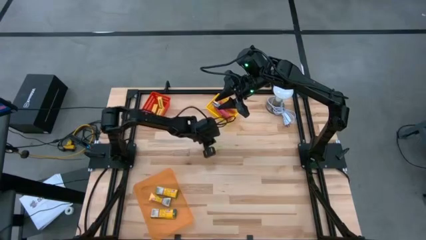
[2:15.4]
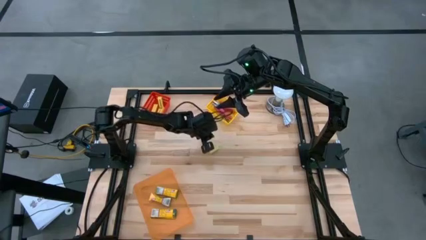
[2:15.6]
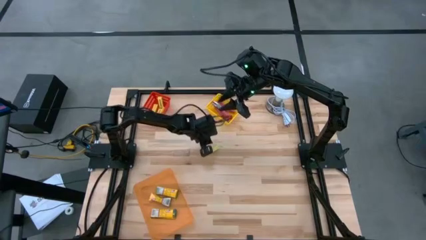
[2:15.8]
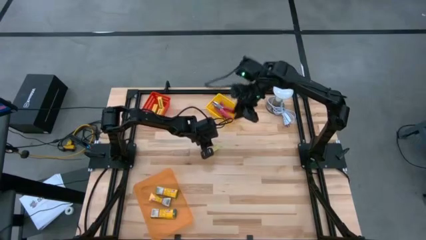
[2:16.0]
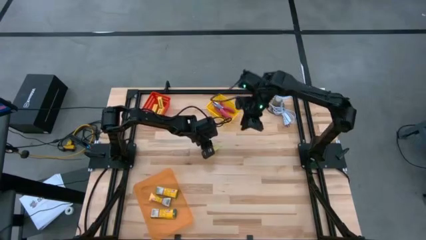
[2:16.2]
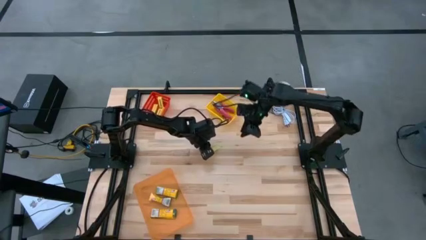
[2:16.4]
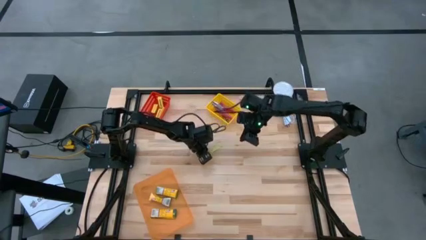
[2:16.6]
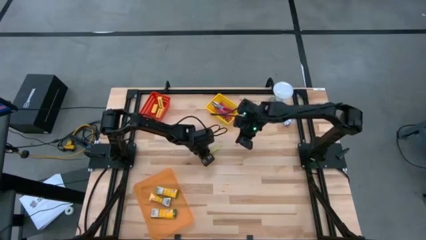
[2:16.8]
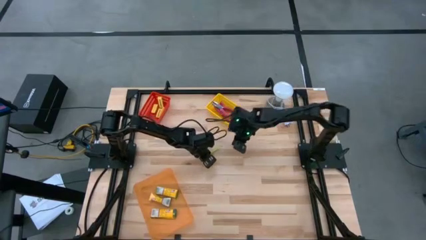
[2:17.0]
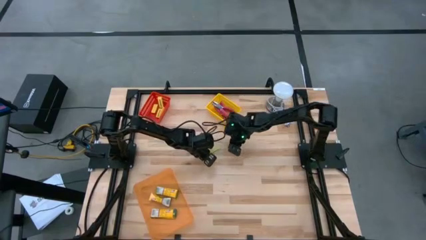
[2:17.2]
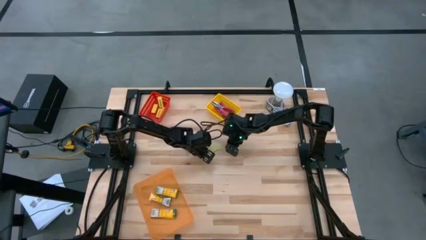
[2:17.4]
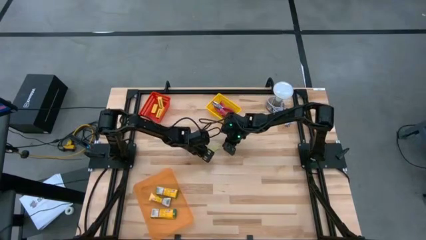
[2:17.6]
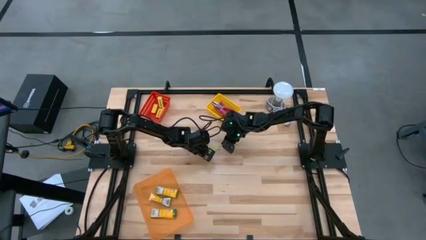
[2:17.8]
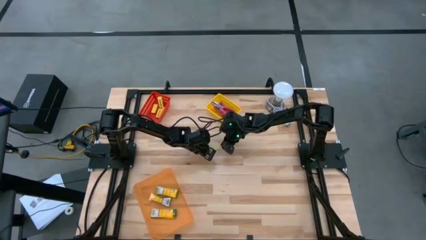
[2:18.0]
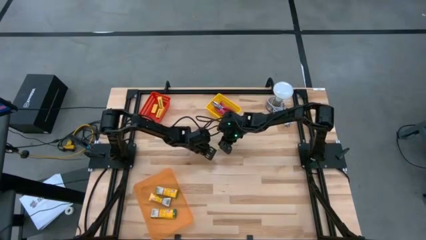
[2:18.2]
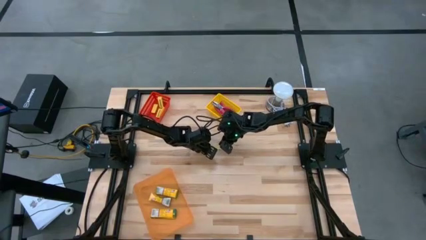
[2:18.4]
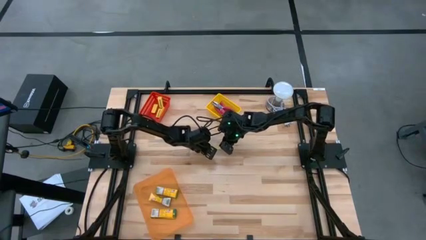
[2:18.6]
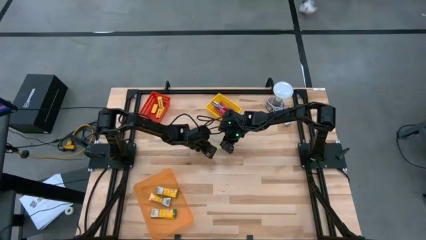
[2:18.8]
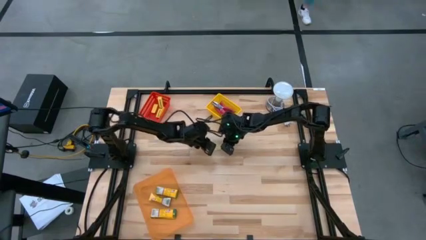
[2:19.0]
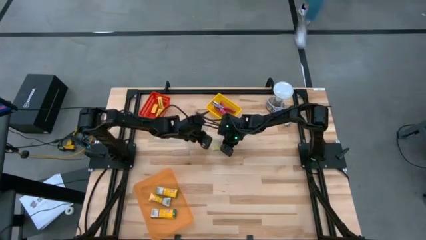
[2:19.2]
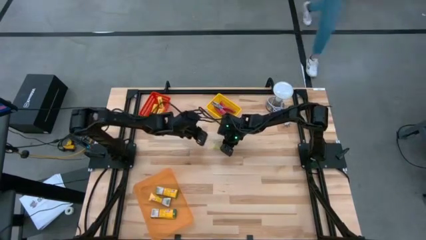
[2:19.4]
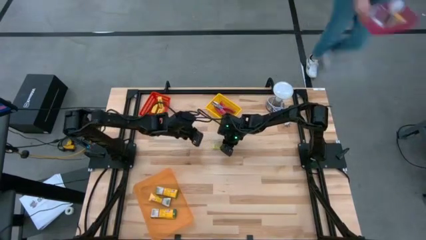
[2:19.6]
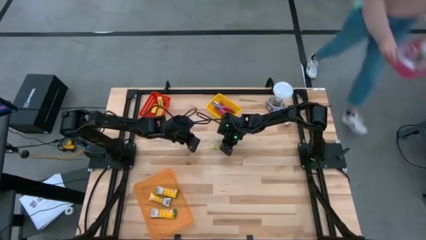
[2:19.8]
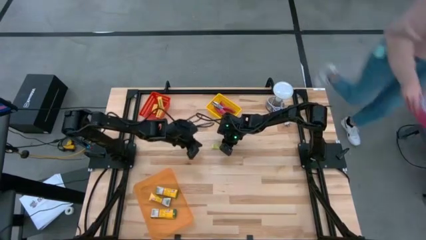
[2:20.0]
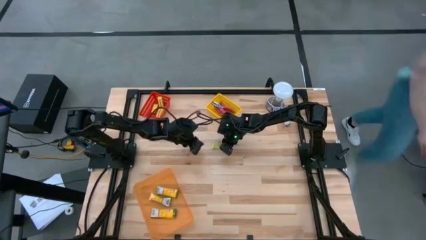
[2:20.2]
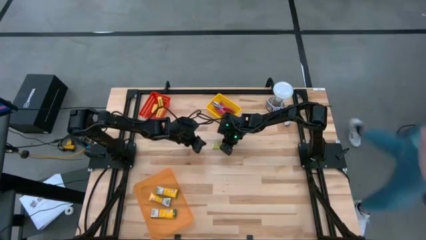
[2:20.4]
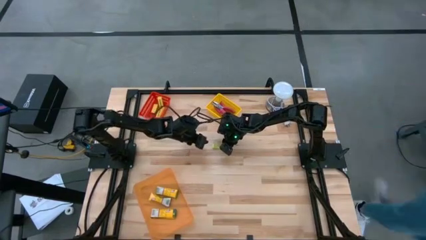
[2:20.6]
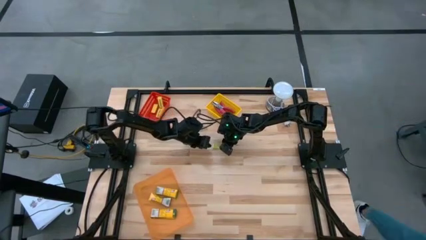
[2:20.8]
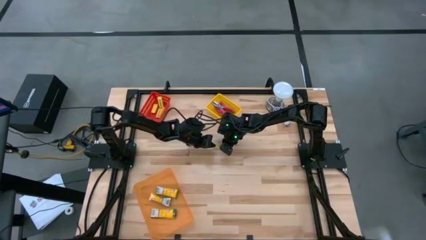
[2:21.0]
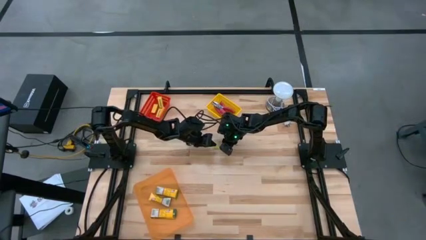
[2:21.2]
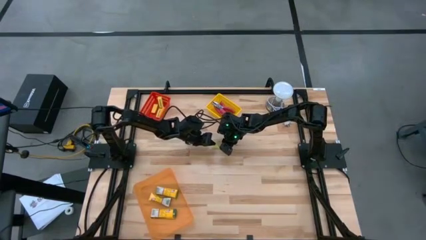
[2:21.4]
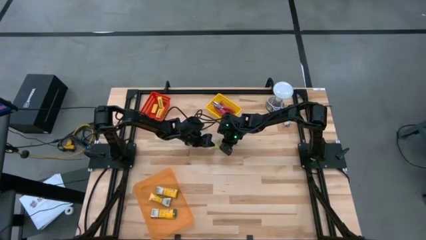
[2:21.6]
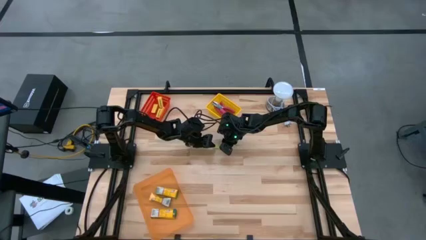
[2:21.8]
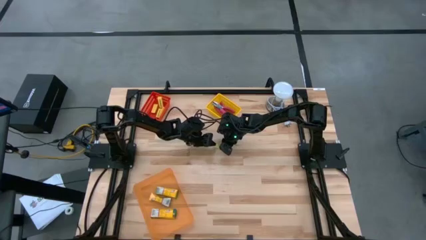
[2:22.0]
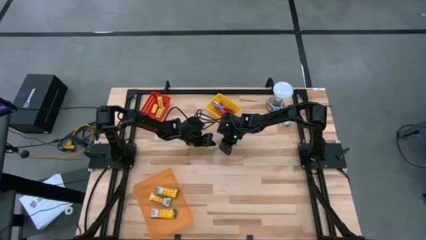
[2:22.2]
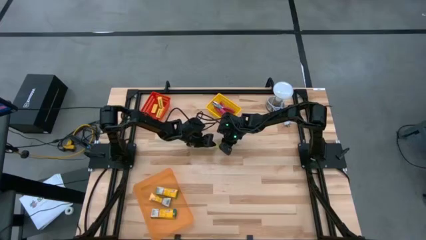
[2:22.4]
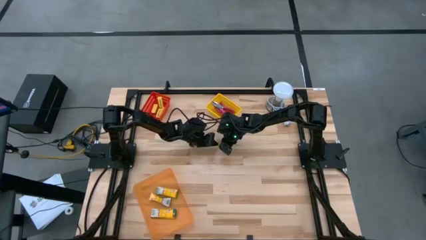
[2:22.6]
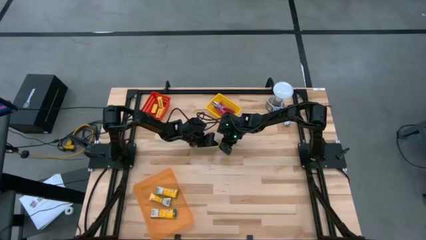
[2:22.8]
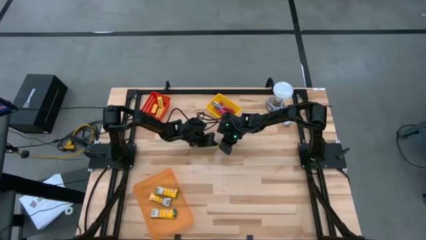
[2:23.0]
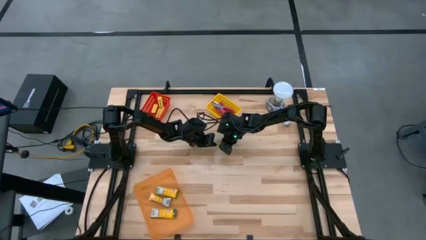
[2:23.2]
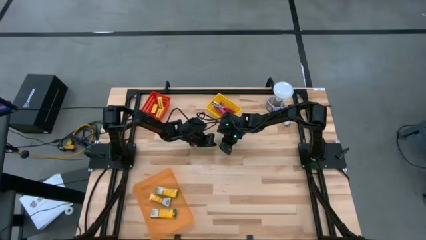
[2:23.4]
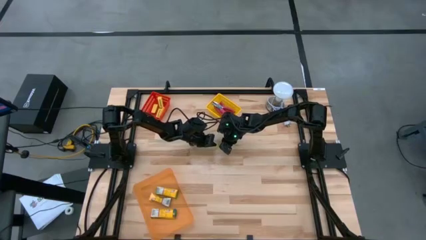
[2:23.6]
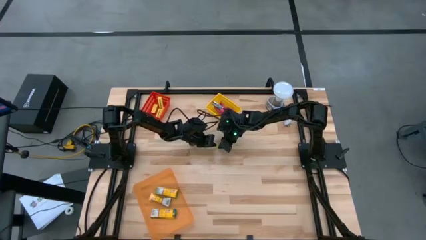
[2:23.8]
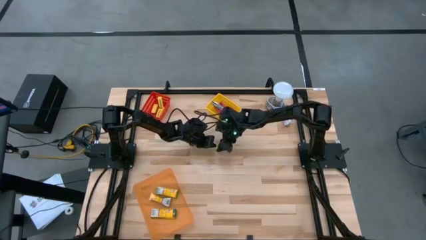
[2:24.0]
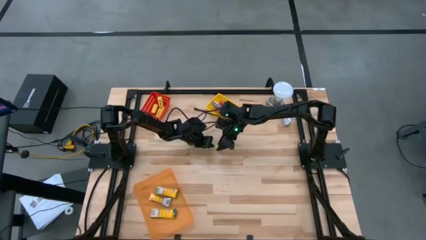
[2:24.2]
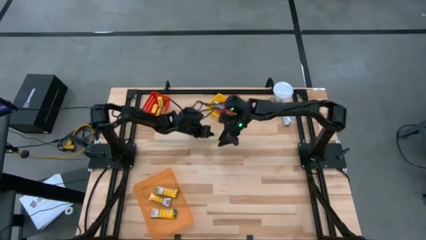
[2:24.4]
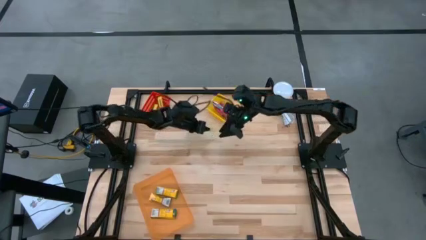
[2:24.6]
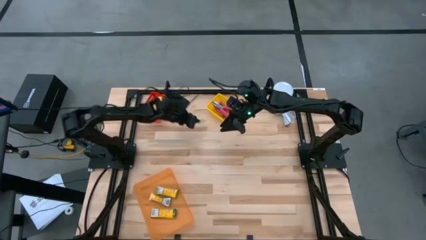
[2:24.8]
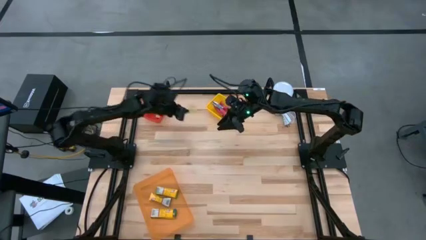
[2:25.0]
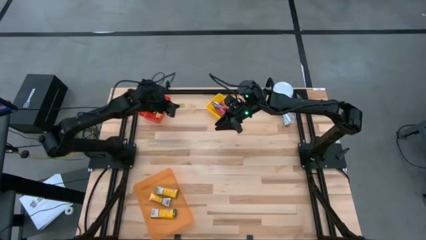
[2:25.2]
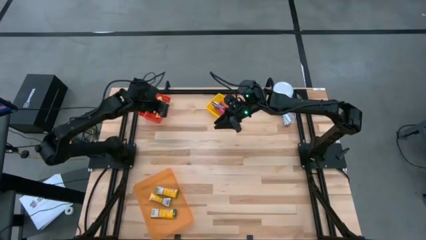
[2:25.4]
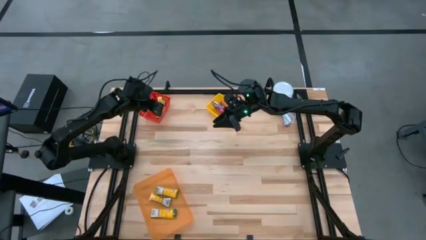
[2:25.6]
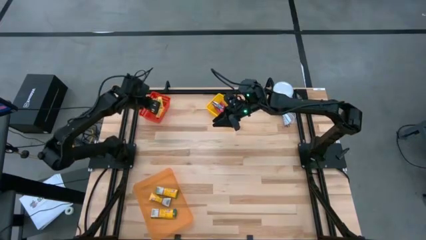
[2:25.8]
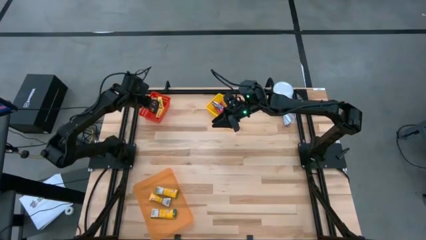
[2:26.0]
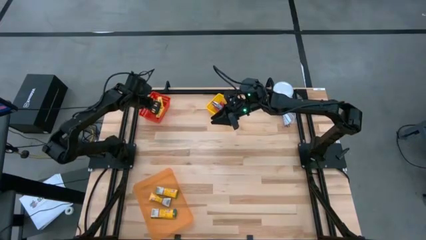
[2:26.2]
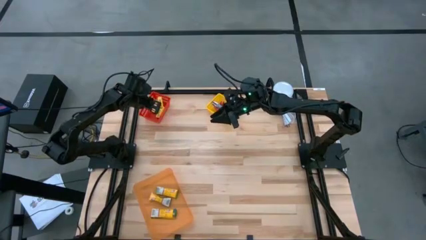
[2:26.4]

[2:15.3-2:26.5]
Task: Pick & Place School Supplies
Put the light green eraser into the red bin

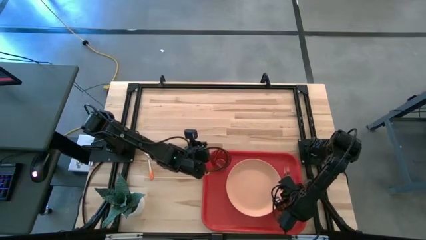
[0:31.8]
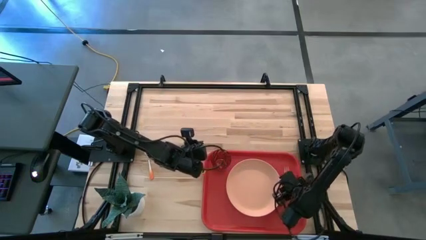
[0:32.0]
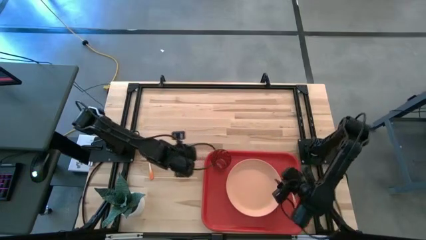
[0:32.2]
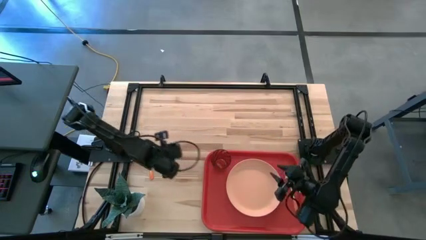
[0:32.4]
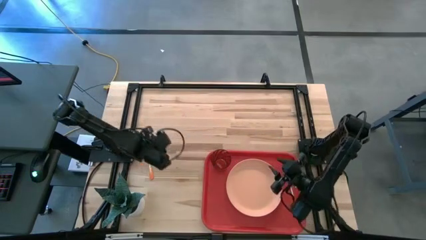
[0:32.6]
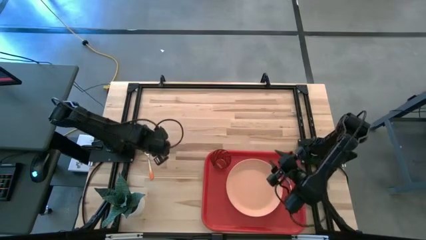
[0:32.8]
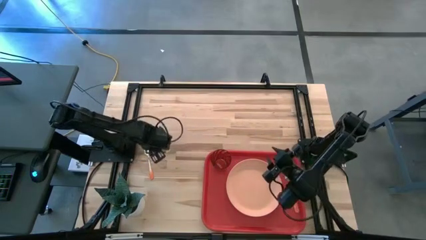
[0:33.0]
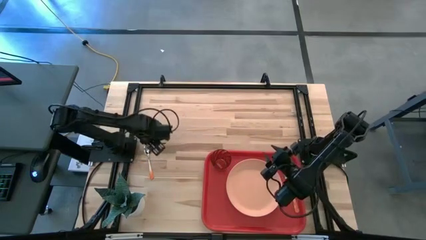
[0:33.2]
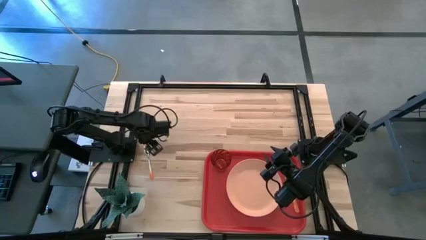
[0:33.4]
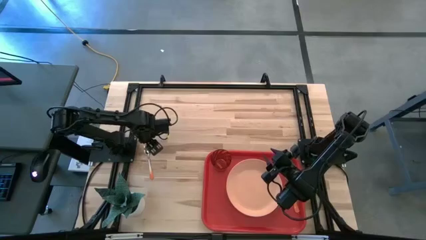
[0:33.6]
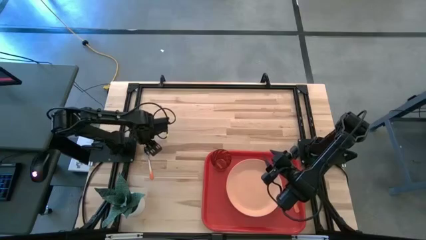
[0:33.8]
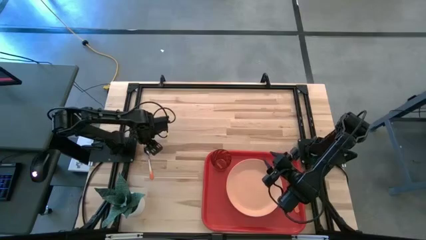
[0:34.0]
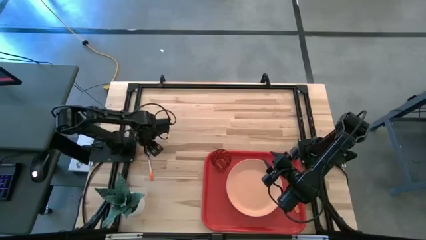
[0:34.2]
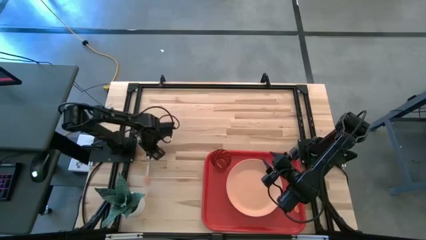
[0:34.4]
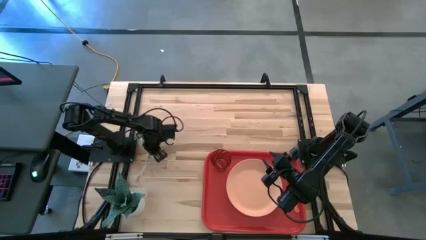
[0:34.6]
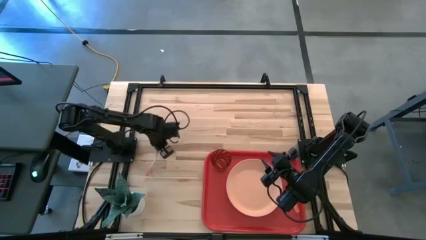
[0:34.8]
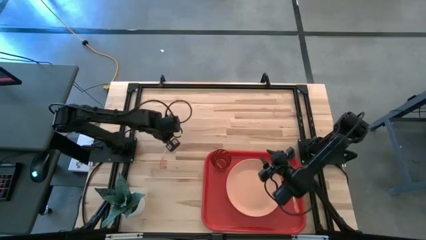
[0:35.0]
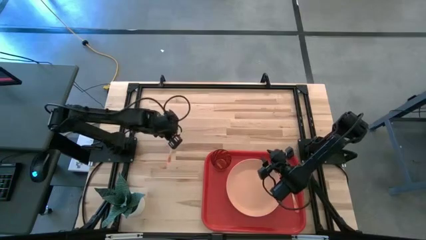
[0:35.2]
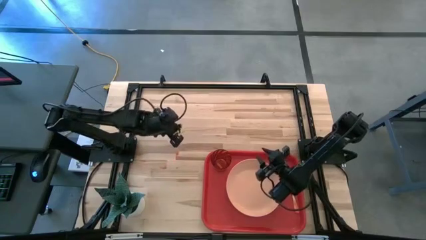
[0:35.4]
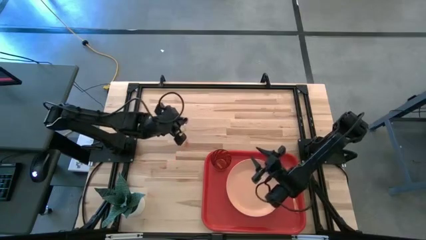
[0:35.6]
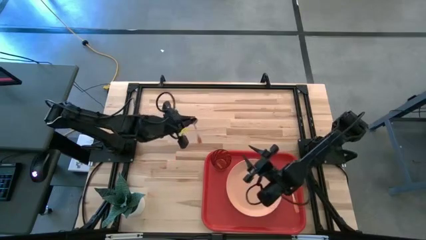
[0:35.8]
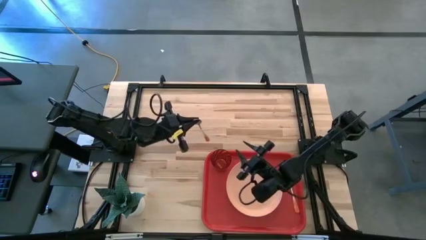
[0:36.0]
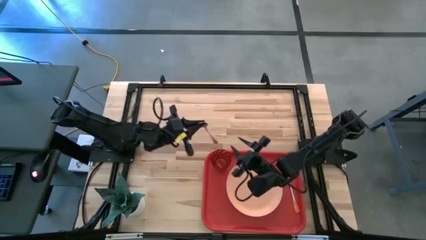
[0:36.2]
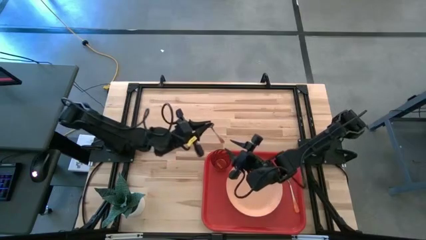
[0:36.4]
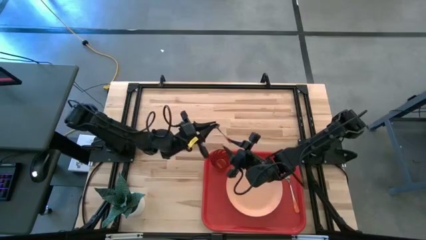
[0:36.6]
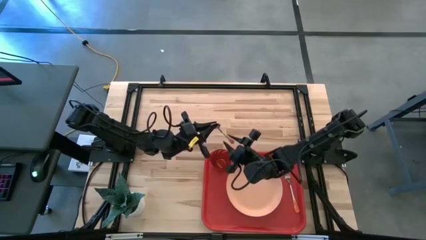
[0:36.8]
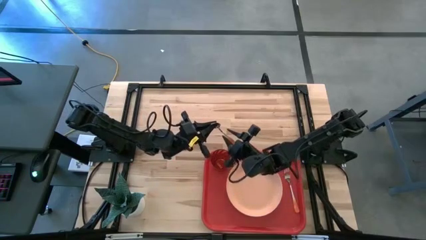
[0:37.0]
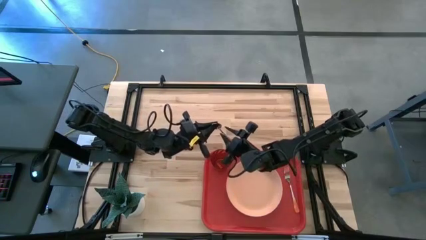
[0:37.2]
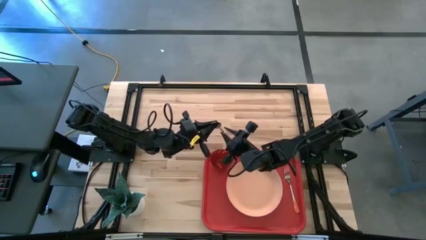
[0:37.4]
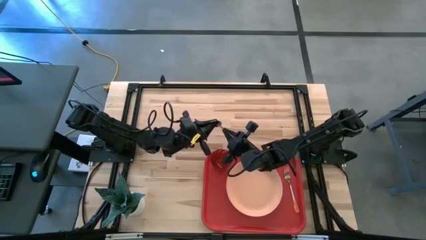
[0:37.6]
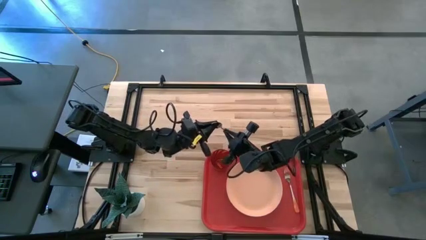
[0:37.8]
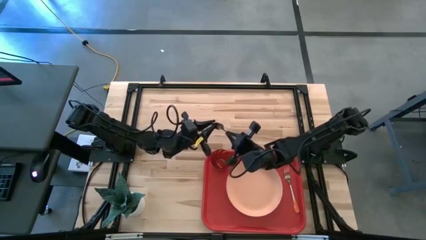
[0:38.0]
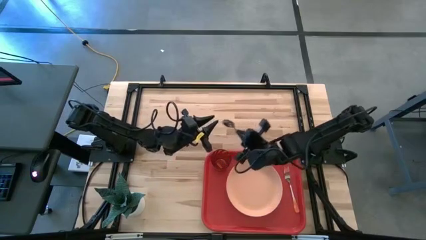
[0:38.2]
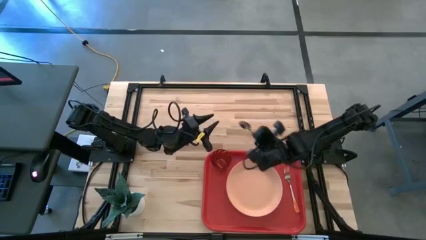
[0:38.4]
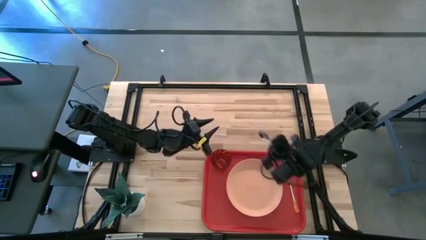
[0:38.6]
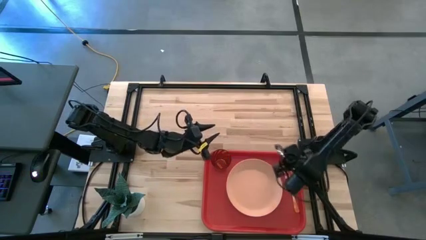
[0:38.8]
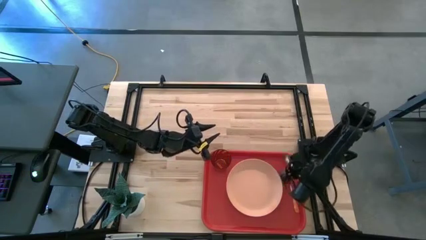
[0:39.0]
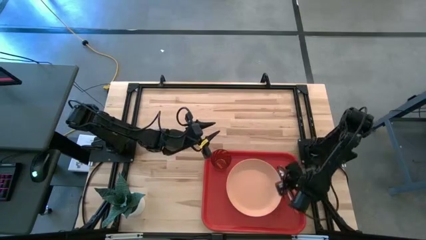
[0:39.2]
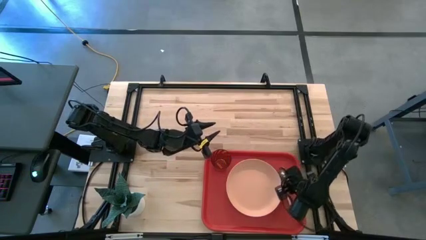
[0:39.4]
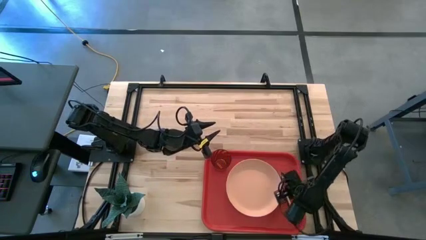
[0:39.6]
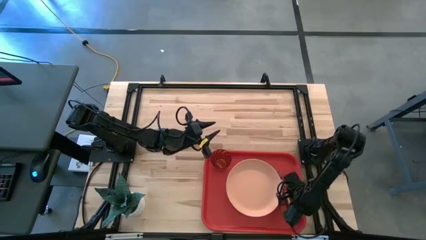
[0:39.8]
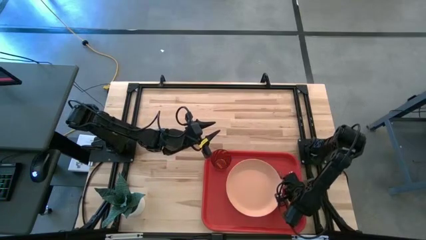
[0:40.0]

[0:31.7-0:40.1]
Task: Pick and place plate/cup/fork/spoon on tray
Put the orange spoon on the orange serving tray to the right of the orange fork
